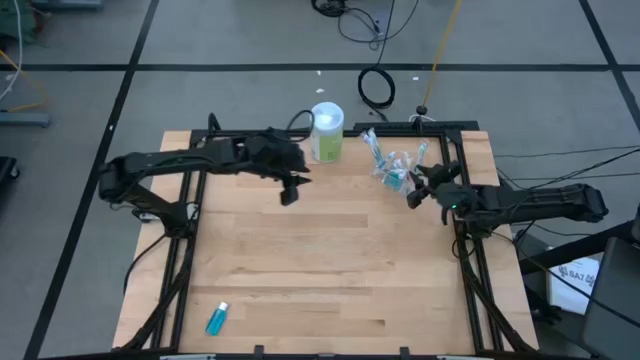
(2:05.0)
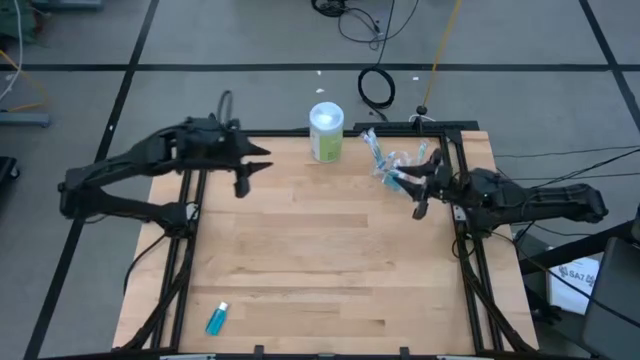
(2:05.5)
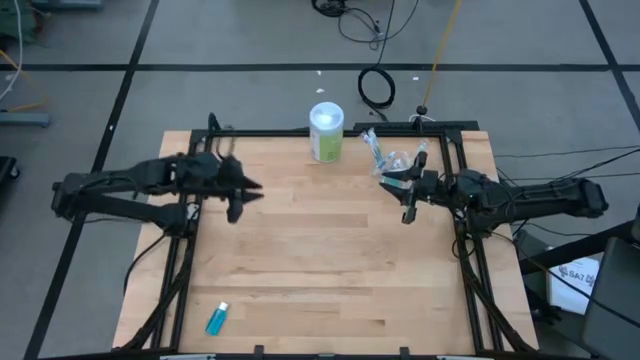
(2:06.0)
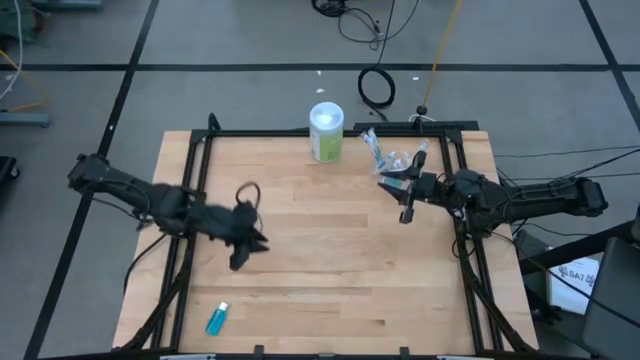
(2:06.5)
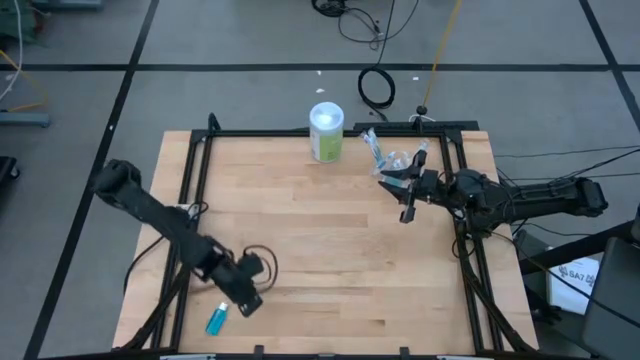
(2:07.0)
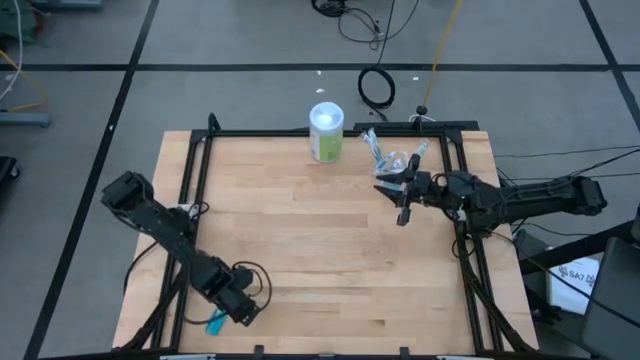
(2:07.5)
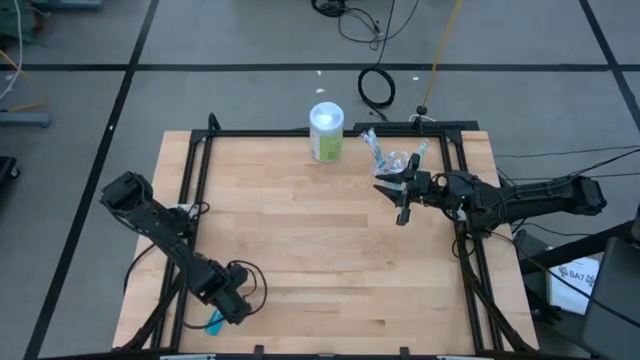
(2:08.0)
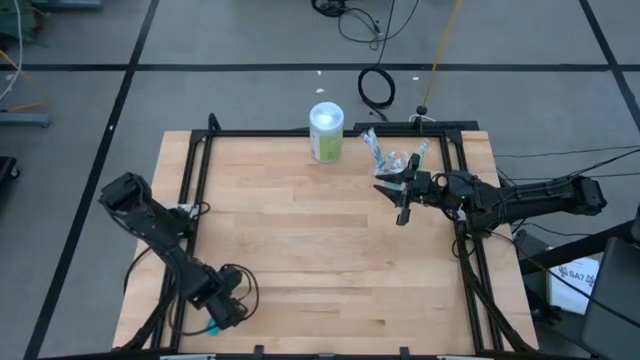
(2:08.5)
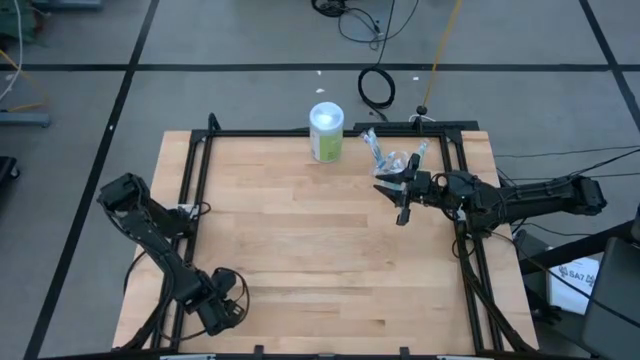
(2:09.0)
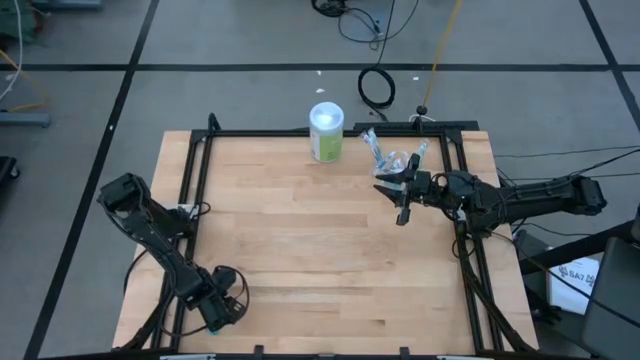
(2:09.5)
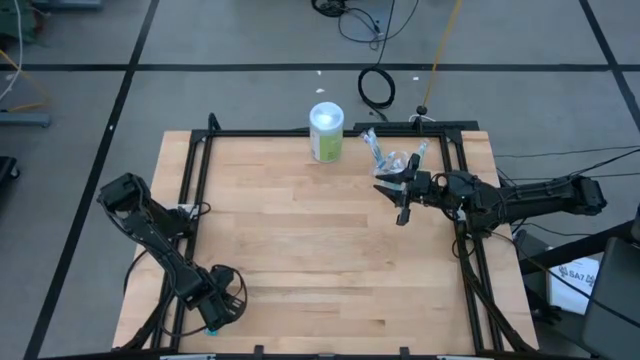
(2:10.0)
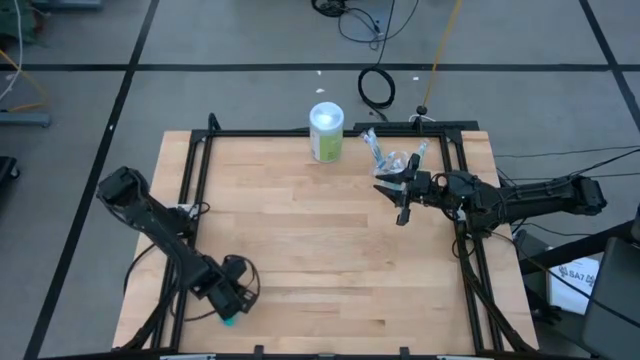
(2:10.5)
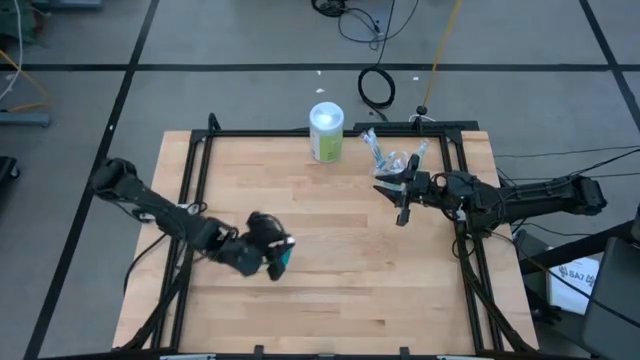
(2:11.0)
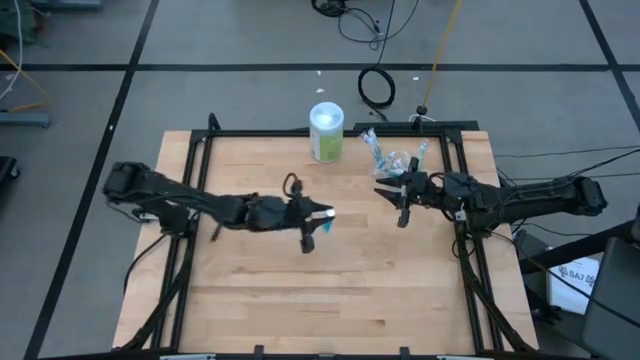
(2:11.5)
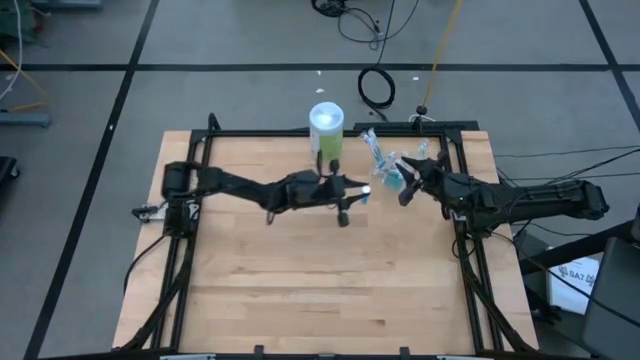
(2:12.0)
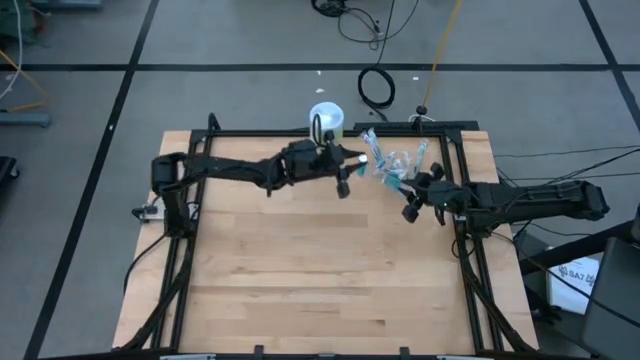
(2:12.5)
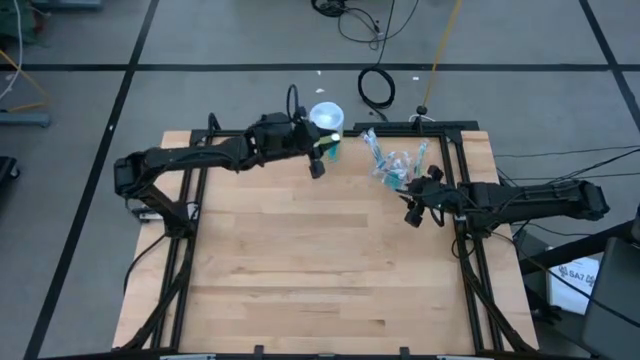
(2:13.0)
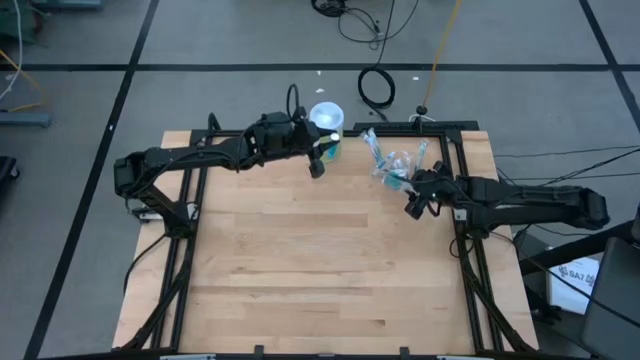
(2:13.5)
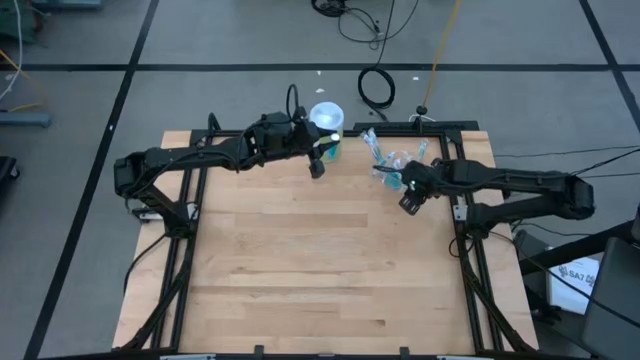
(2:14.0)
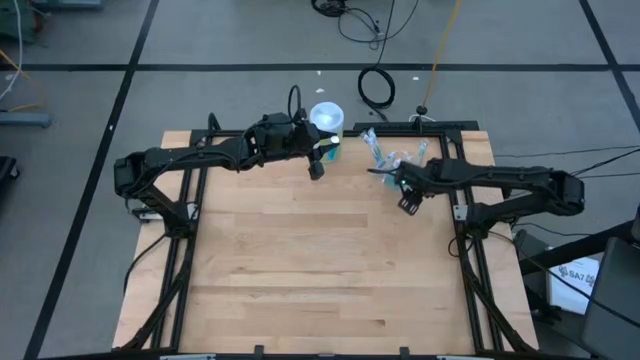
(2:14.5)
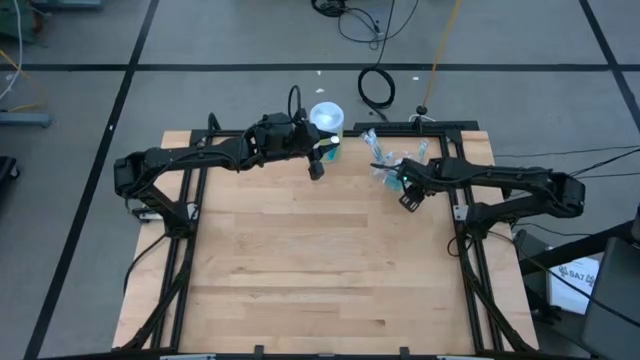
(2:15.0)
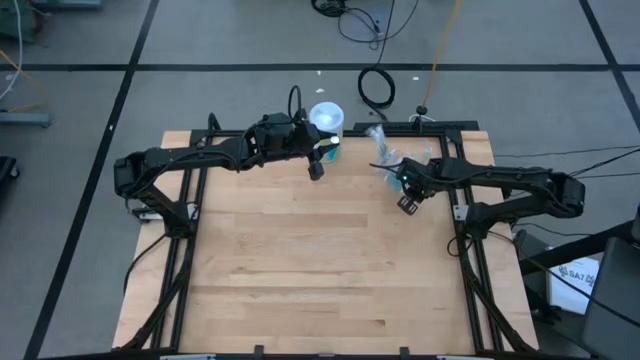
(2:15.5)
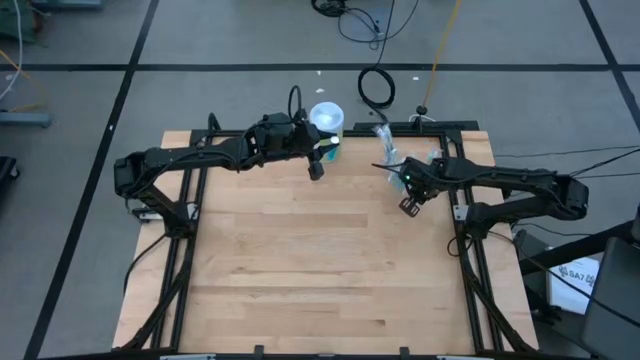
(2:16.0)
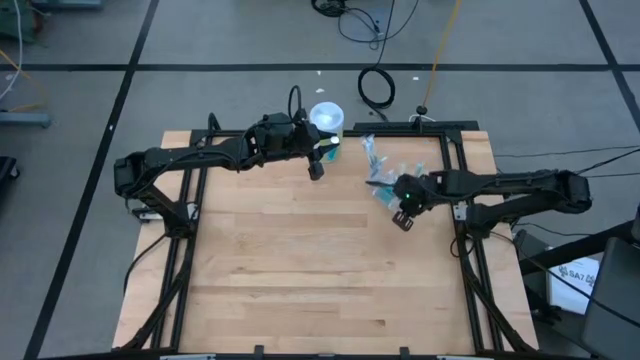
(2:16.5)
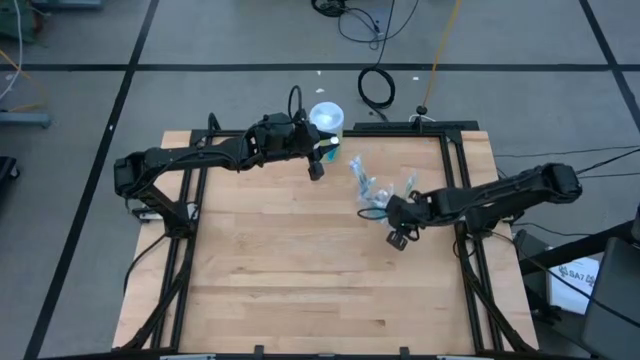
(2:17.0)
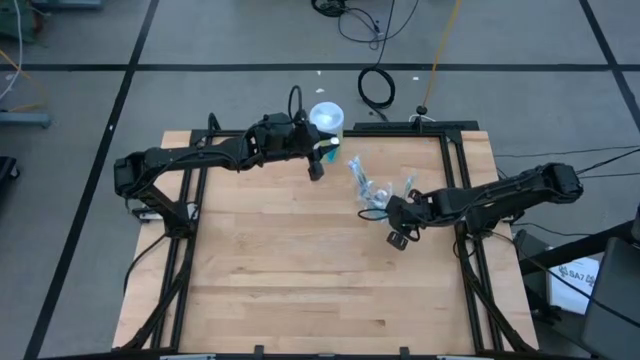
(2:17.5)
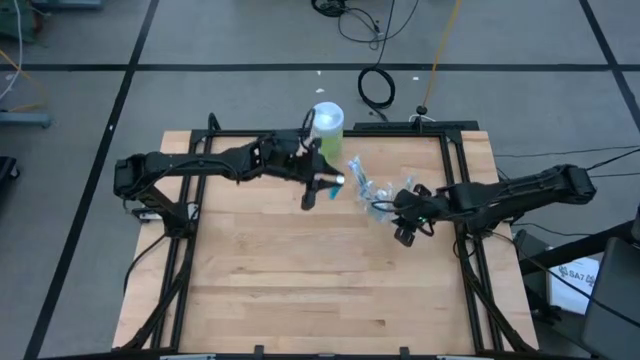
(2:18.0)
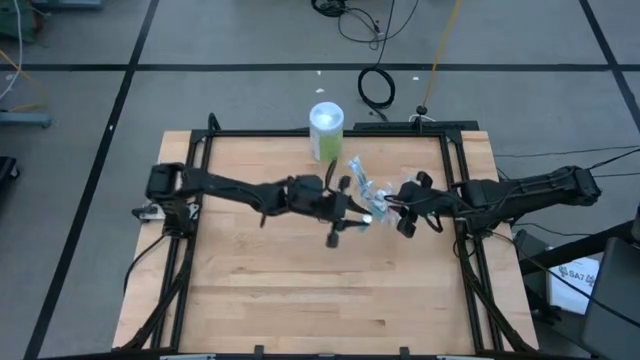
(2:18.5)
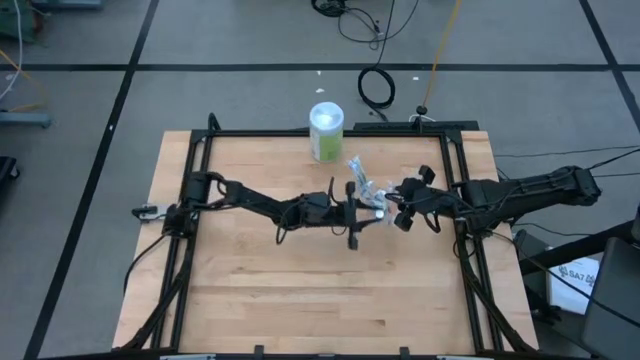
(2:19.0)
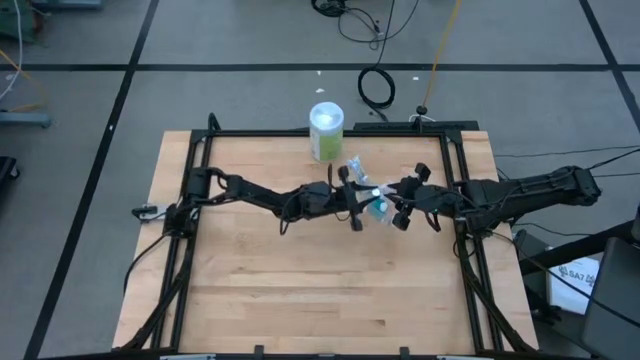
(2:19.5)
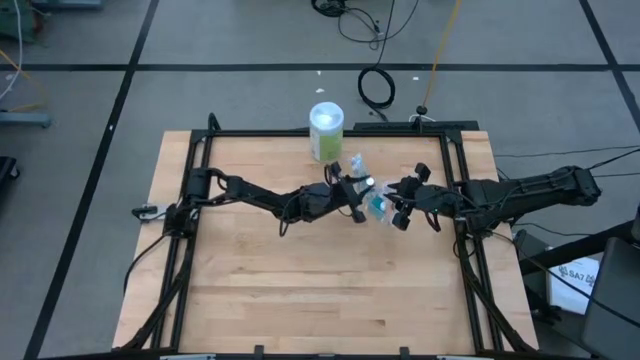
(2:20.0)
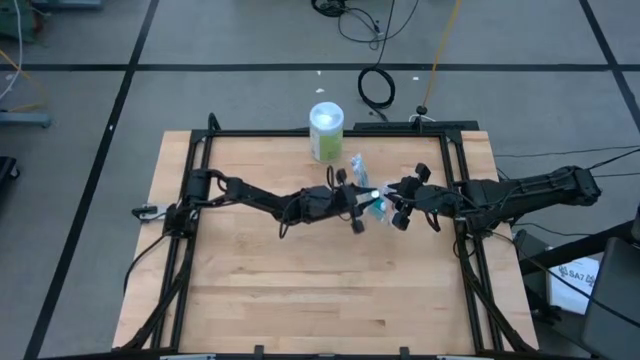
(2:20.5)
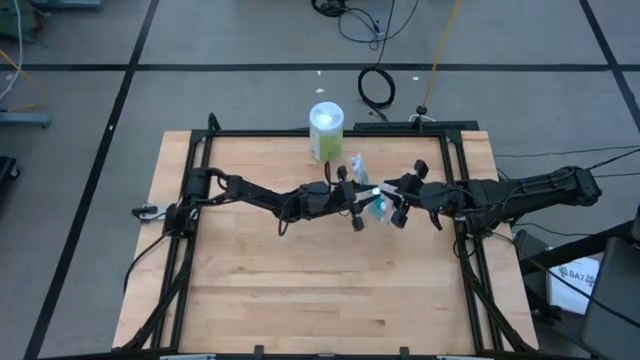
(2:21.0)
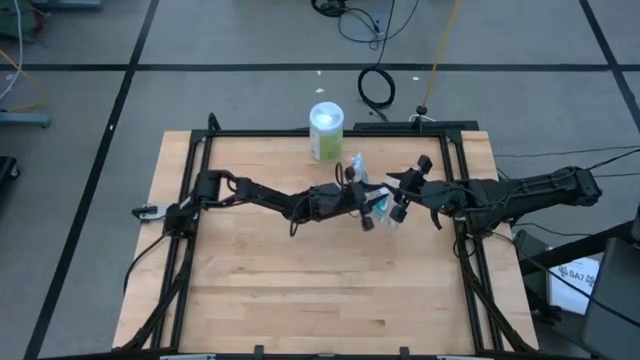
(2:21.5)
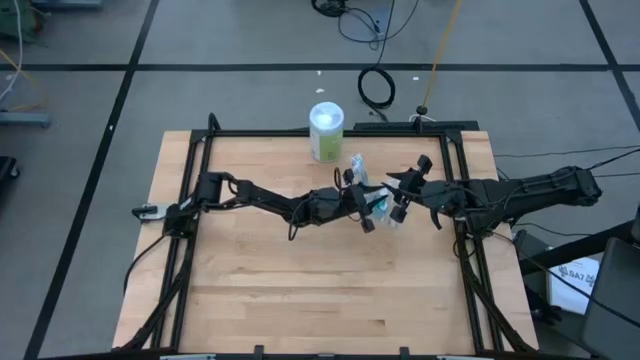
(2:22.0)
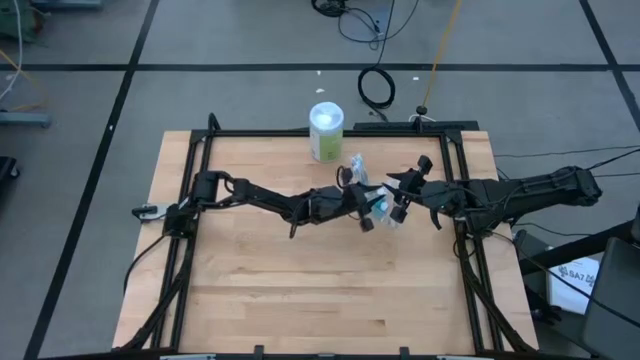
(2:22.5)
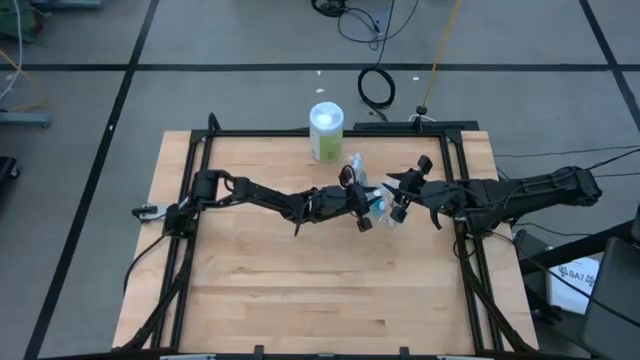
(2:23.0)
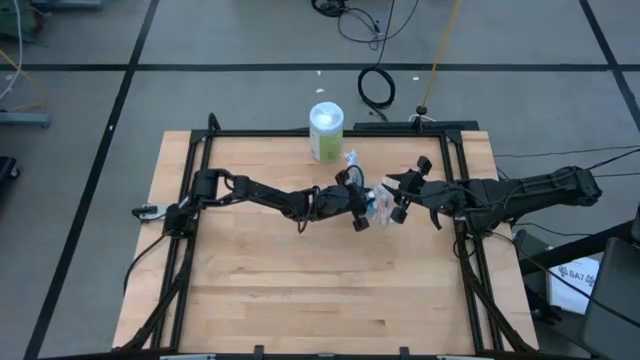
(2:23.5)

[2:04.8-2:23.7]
Task: Pick & Place toothbrushing station
Put the blue mouthwash into the transparent organizer

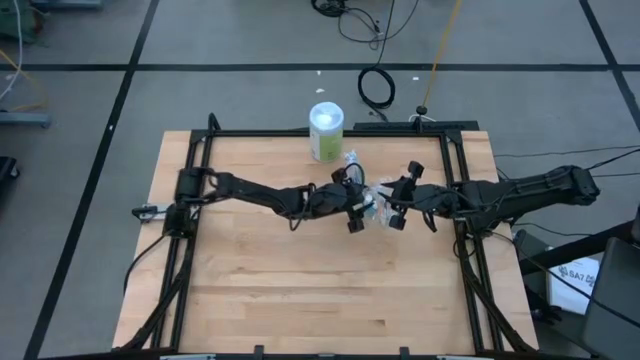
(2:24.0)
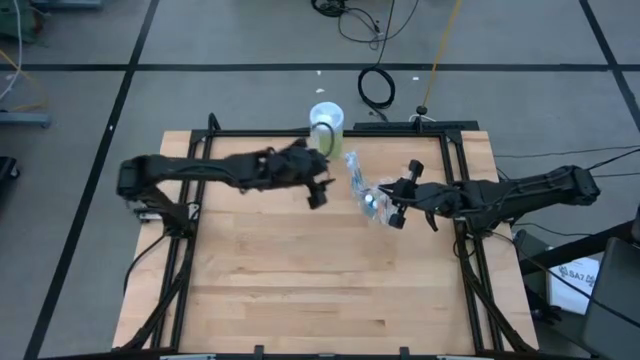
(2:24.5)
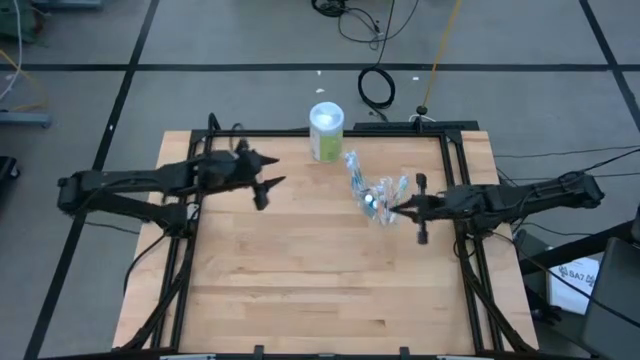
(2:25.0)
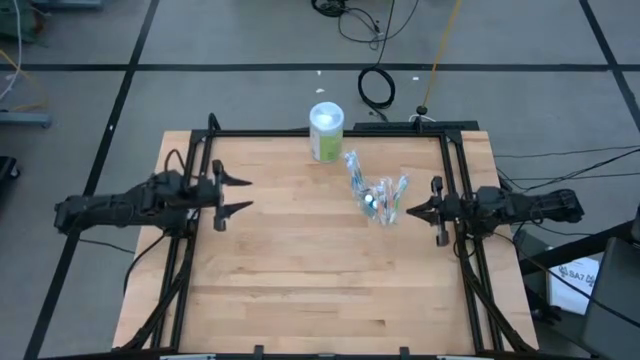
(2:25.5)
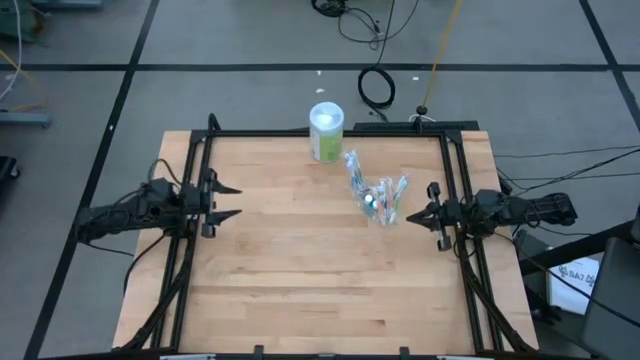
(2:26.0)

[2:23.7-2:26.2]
Return to Home Position
